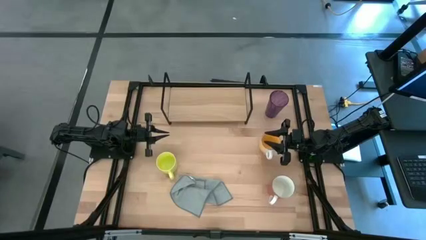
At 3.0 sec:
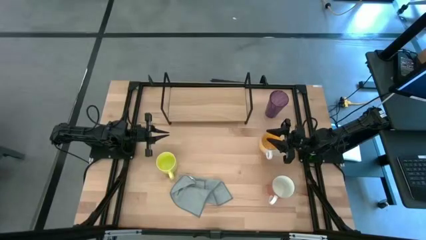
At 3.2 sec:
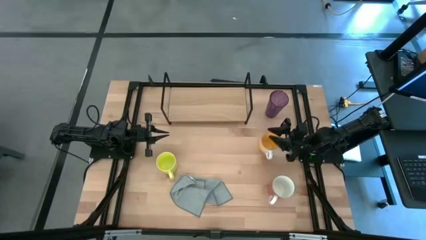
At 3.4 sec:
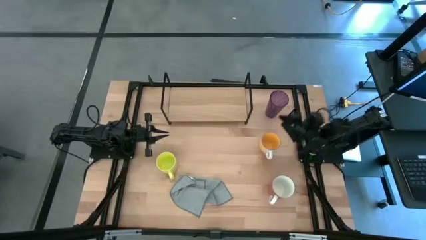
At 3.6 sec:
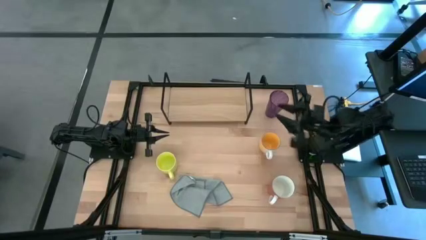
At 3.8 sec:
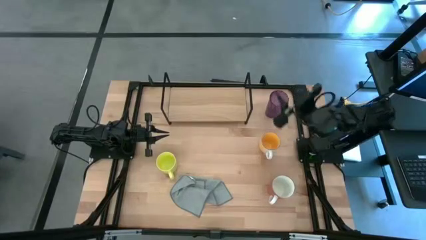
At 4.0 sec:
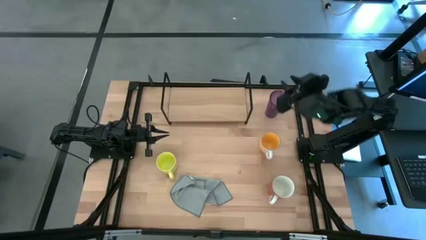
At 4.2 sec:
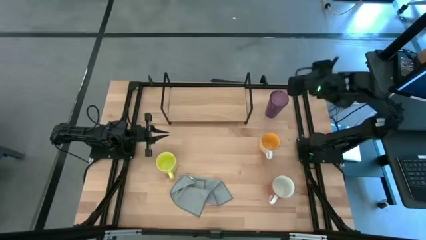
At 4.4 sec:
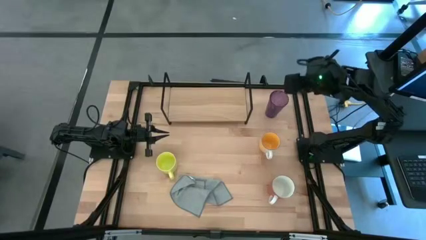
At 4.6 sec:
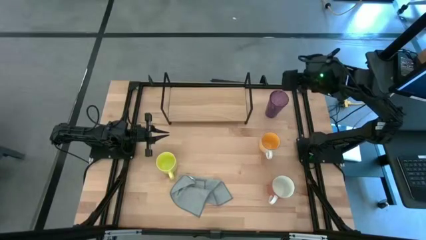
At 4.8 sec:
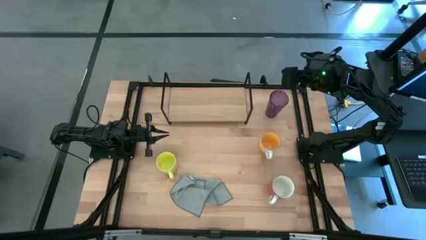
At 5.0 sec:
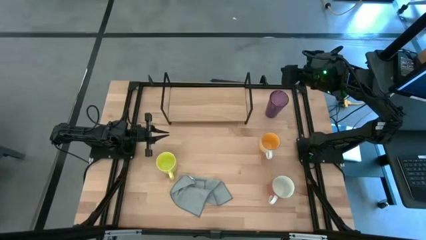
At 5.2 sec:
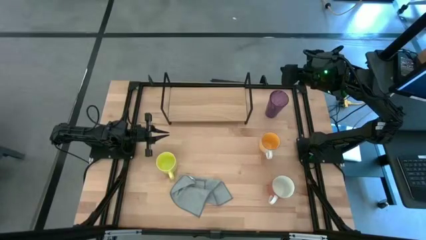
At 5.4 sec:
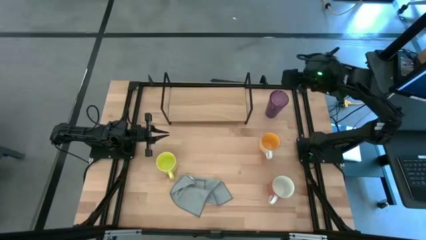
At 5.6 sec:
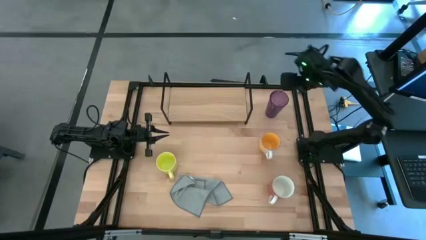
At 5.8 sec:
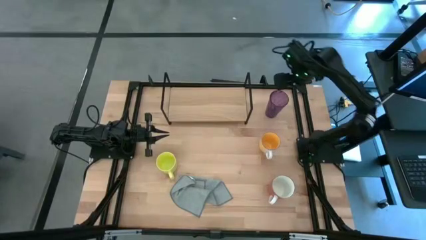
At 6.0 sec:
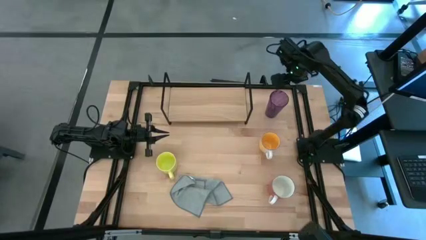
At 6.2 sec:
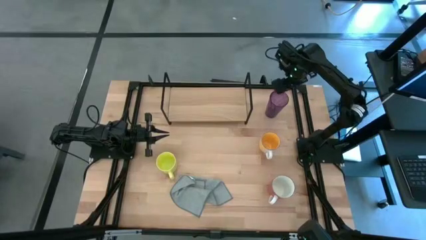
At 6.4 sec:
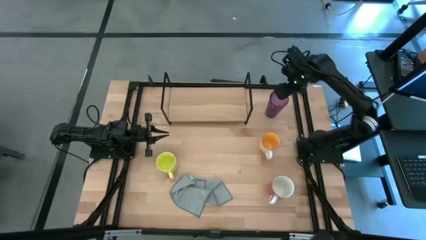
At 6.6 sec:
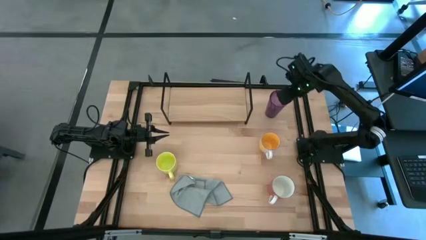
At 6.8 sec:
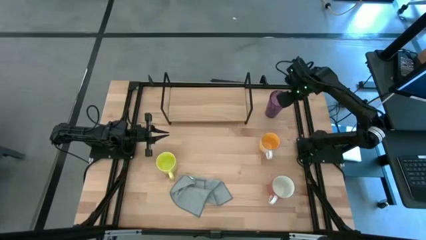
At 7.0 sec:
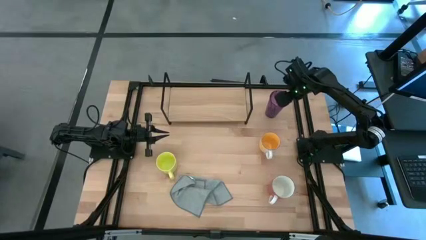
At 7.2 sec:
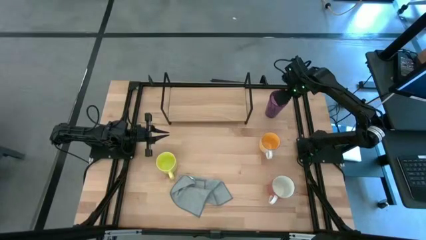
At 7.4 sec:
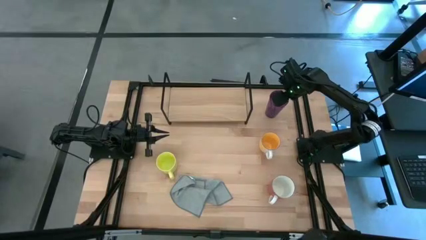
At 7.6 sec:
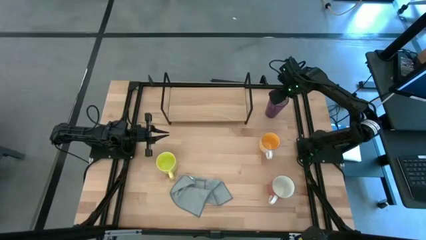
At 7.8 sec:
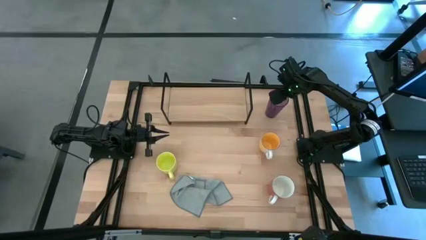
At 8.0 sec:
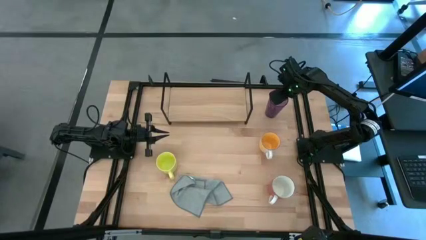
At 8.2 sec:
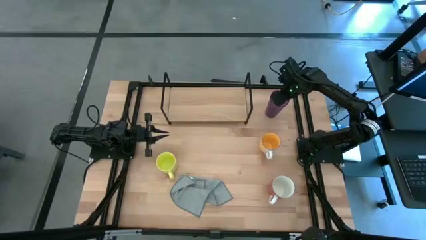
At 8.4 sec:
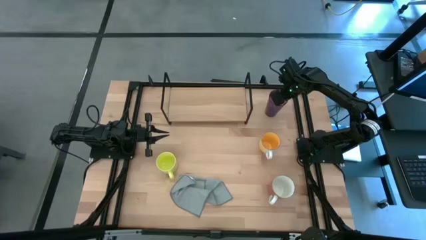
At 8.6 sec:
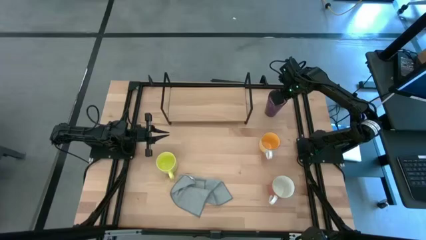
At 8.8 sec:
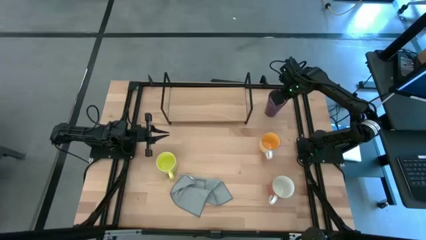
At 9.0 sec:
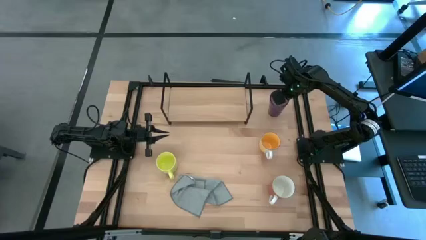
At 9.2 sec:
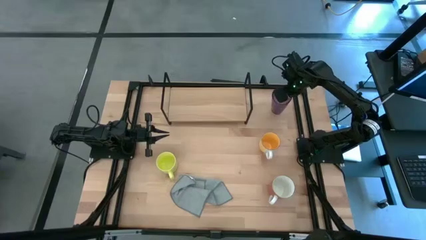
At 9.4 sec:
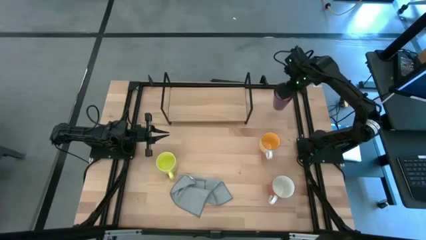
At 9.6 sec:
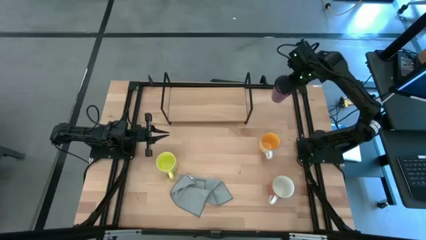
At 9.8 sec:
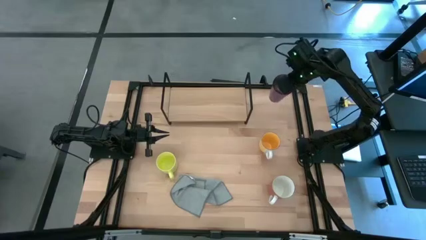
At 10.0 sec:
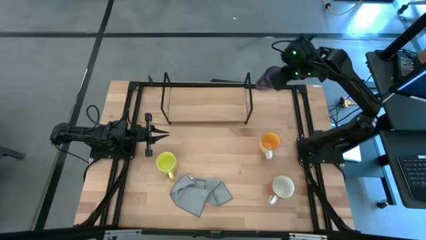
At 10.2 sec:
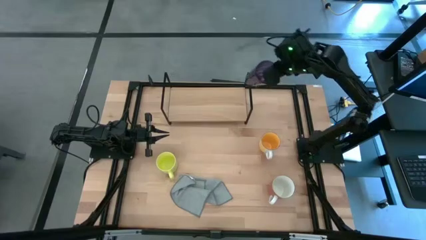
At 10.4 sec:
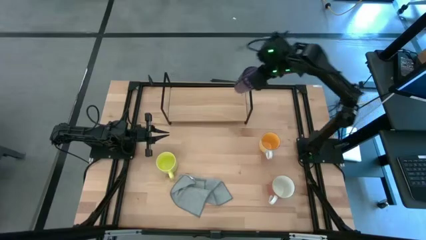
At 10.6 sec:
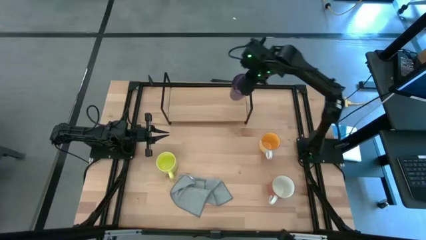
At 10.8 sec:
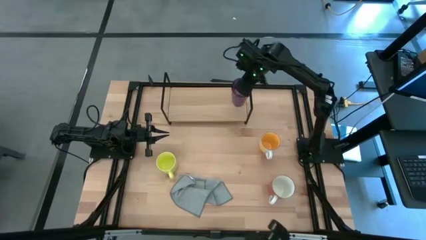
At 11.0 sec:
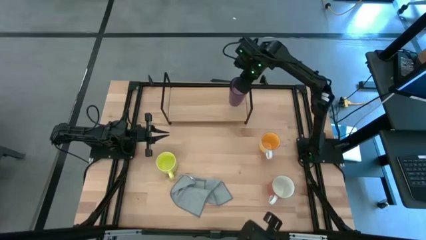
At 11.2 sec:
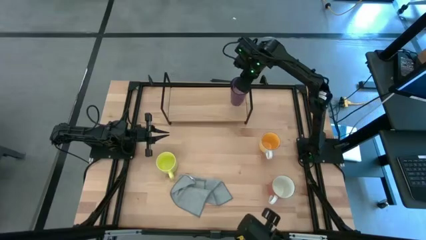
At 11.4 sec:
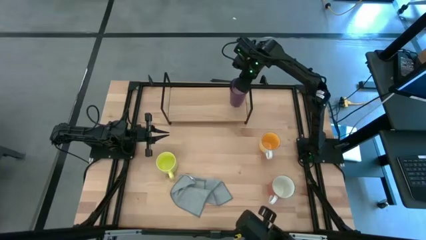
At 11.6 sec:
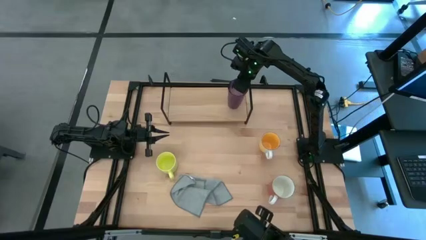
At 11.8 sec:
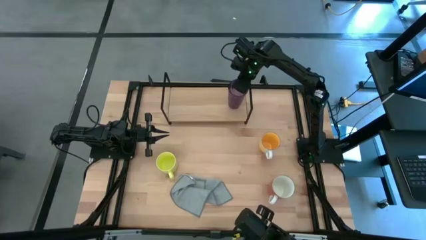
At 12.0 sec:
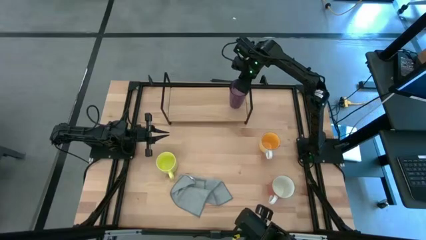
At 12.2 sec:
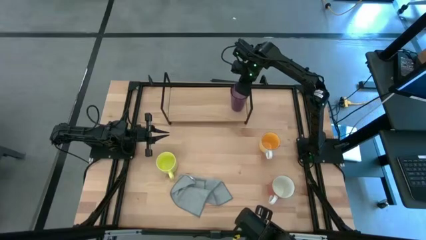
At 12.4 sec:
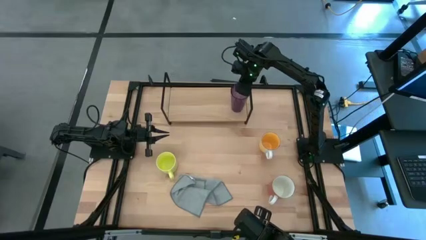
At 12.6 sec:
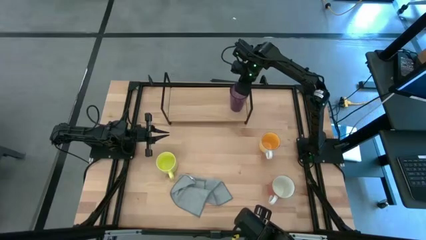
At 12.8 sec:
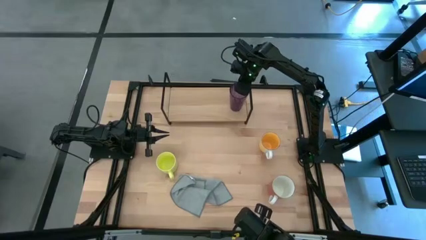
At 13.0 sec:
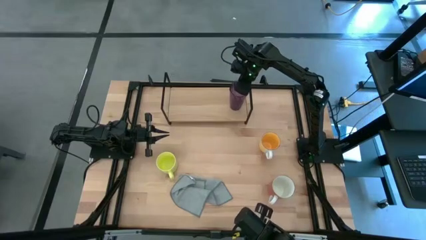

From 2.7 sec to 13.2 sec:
Task: Stack small to large cups/mugs on shelf
Put the violet cup on the shelf
